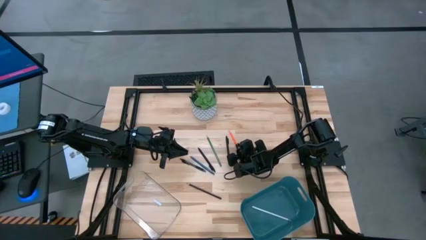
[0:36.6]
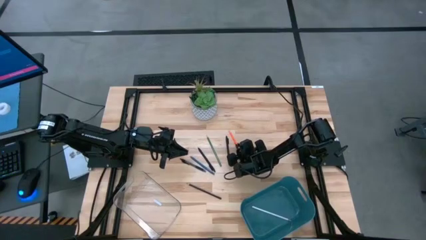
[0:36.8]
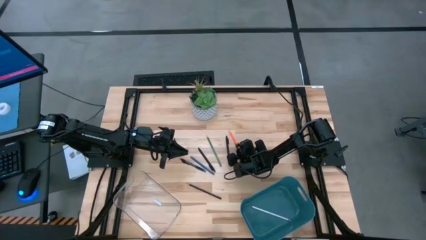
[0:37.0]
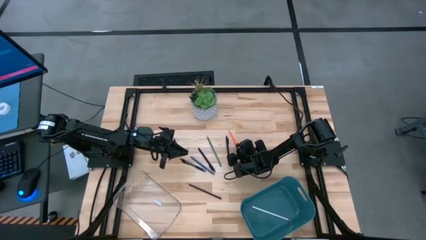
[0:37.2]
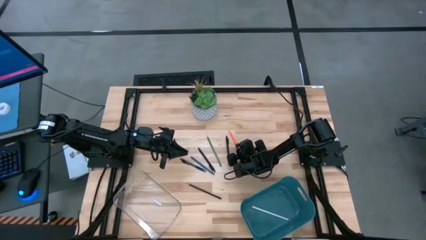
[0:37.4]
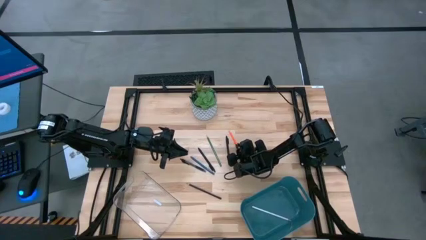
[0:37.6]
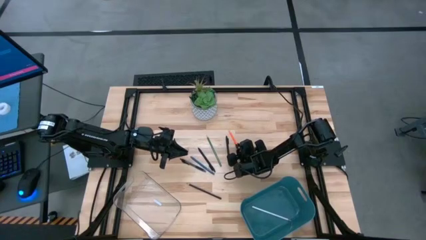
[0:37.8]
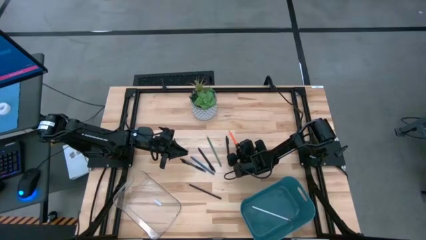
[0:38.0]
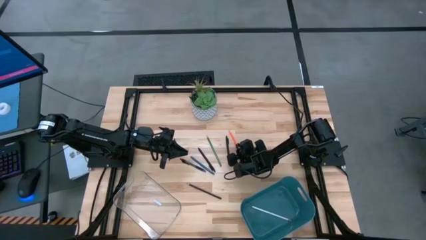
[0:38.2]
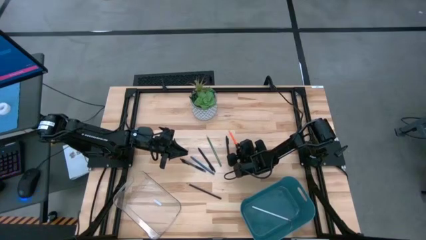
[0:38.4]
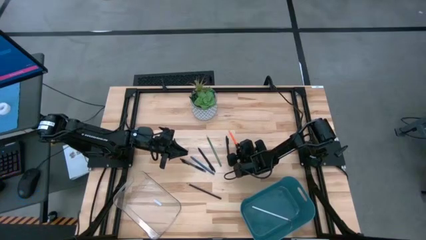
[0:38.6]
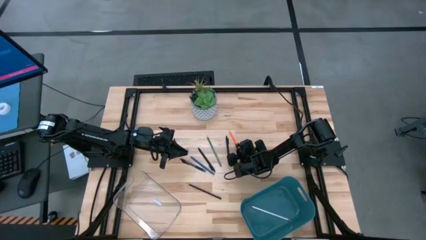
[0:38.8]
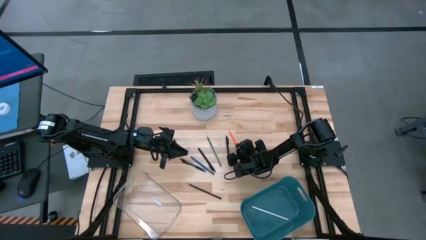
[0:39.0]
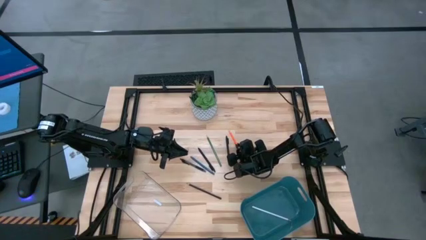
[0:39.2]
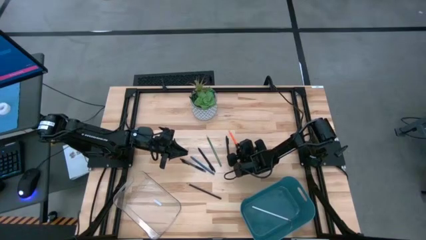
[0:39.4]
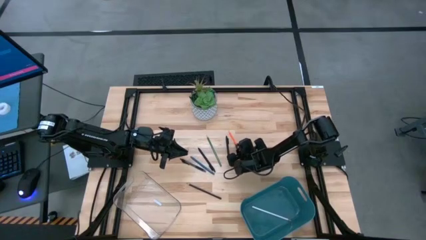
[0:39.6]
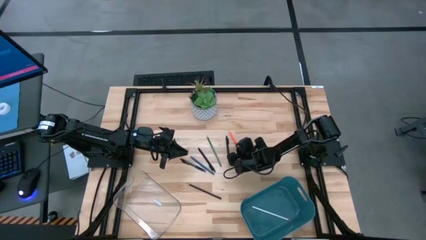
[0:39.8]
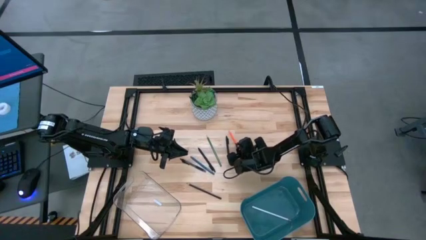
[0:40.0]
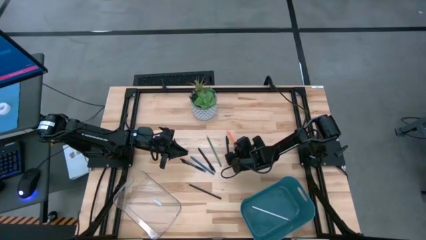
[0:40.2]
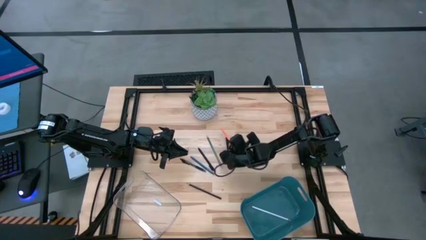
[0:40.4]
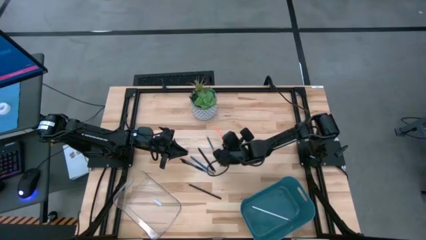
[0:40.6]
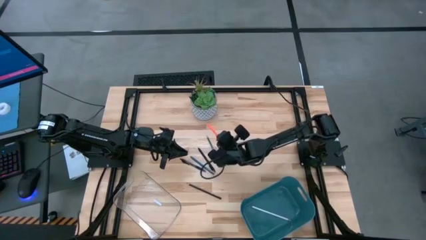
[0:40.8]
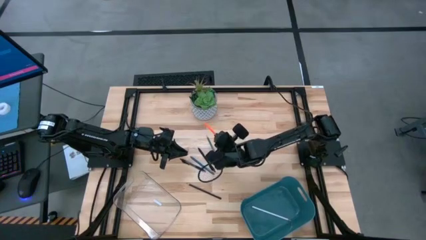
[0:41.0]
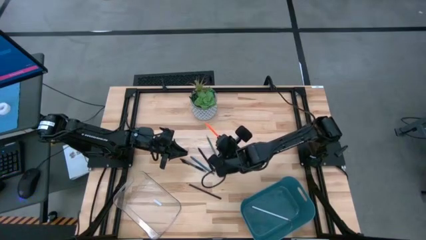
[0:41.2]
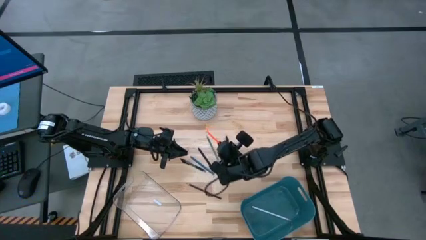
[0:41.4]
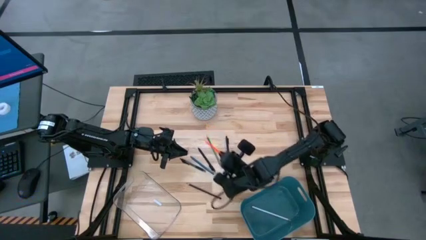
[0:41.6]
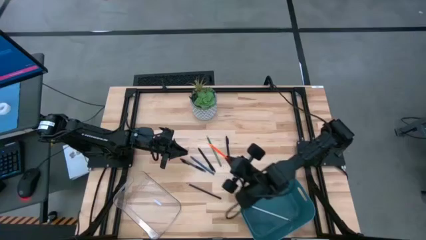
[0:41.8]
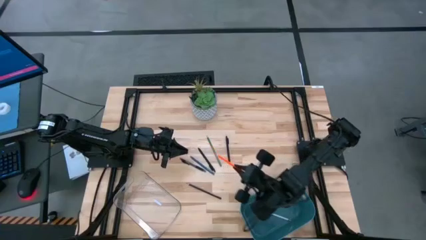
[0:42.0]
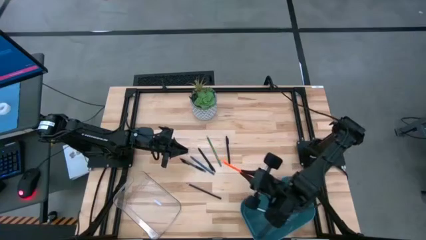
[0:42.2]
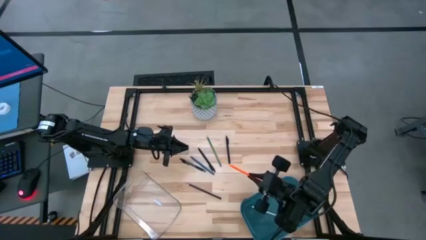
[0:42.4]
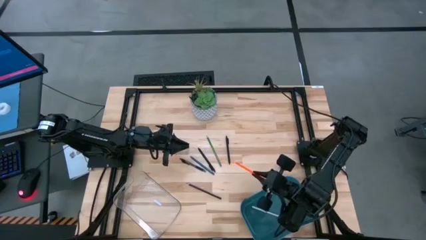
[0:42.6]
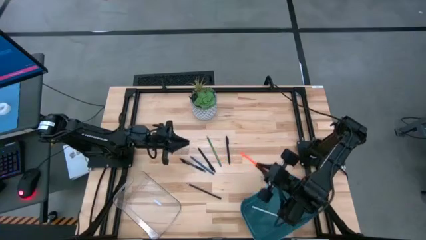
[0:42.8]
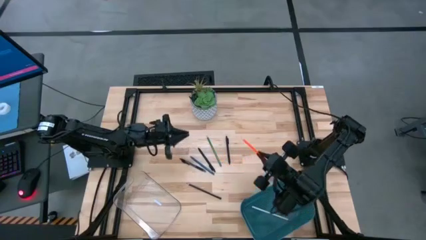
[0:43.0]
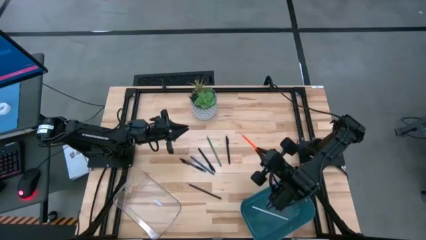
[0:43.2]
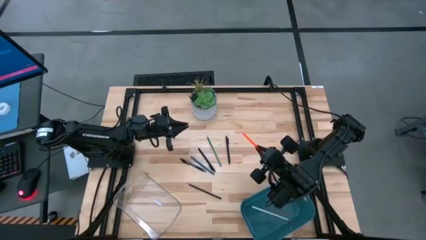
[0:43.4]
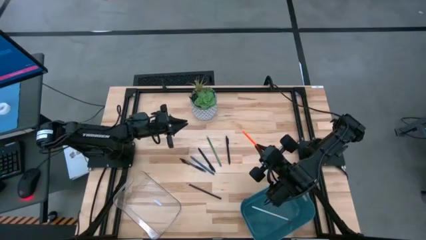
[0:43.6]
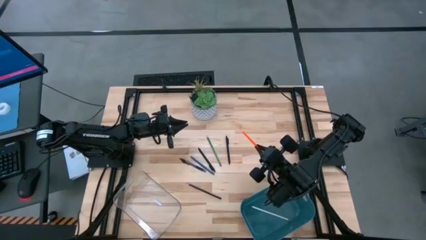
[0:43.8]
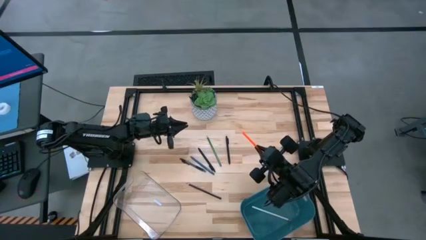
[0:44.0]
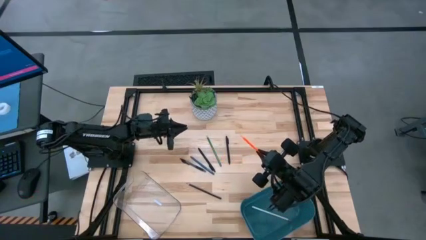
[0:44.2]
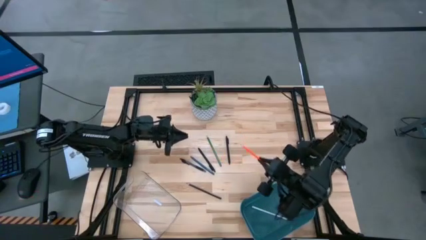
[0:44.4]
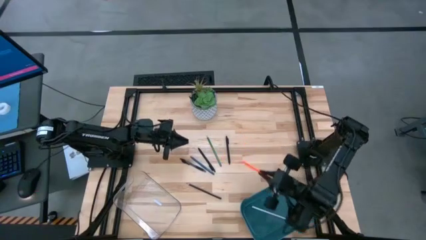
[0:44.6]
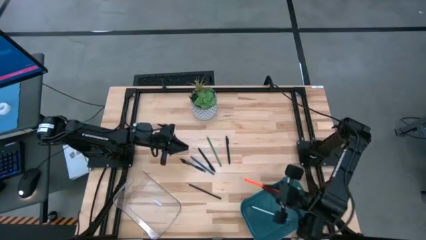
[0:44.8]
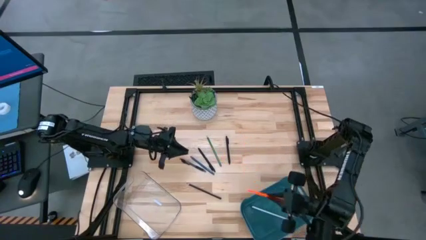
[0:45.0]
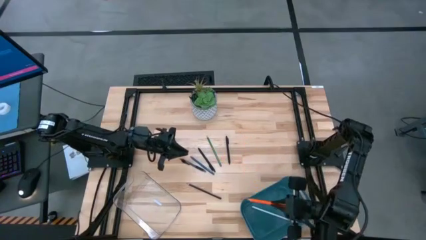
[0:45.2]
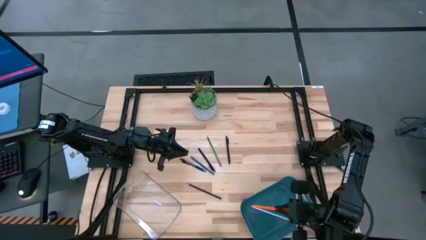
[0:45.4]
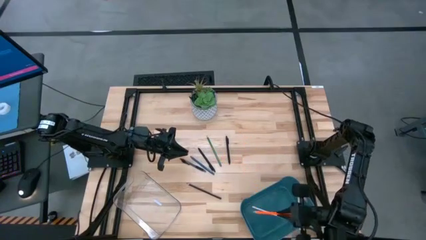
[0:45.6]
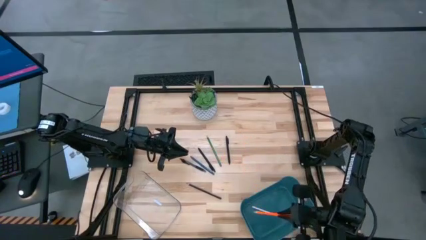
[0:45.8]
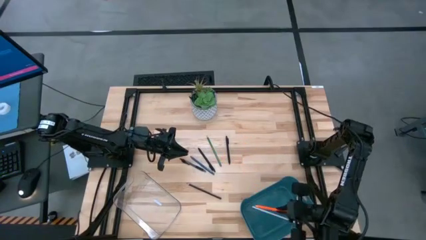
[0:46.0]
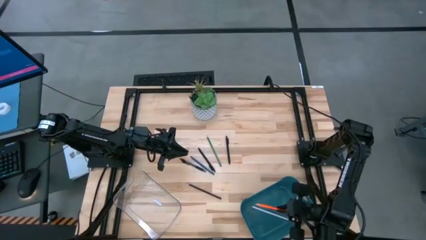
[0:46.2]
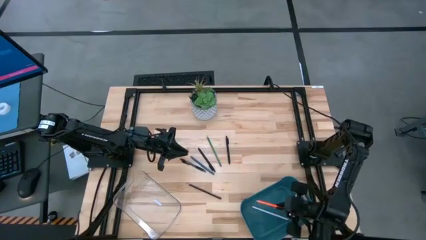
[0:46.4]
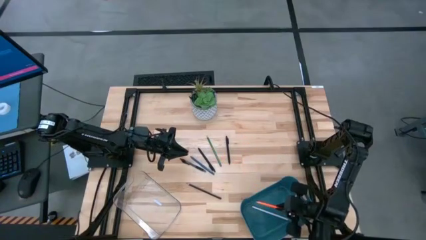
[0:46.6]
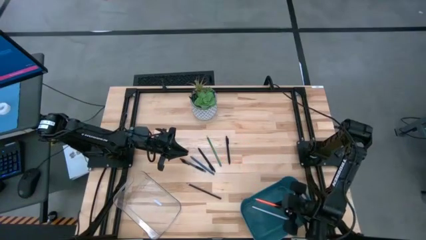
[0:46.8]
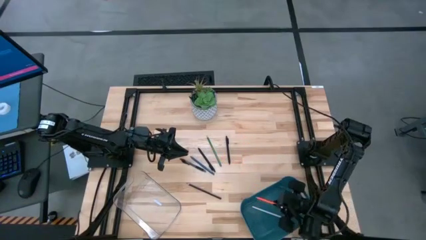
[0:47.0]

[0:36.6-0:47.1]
Task: Sort pens & pencils
Put the orange pencil into the blue bin
